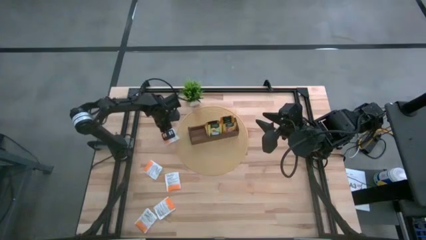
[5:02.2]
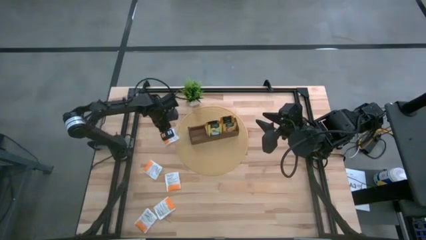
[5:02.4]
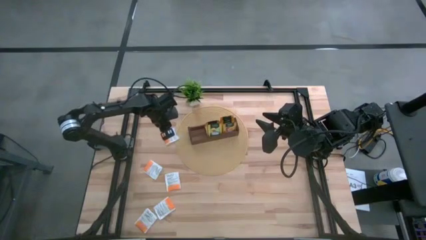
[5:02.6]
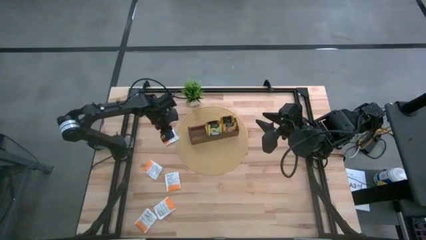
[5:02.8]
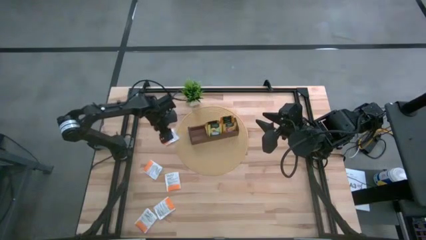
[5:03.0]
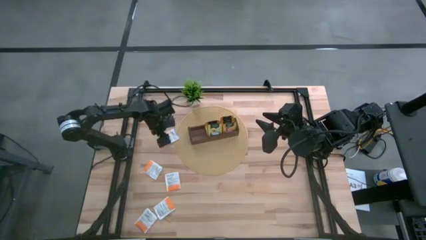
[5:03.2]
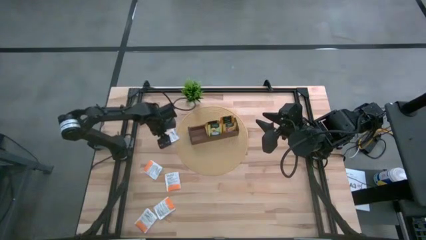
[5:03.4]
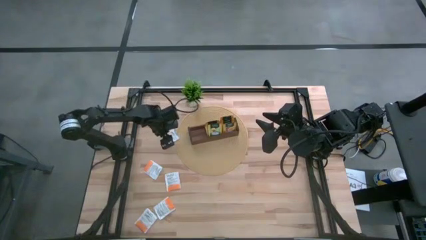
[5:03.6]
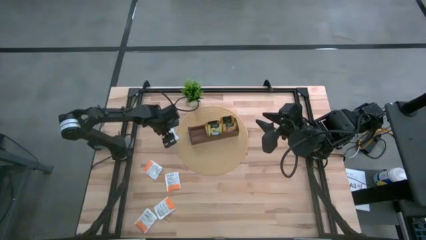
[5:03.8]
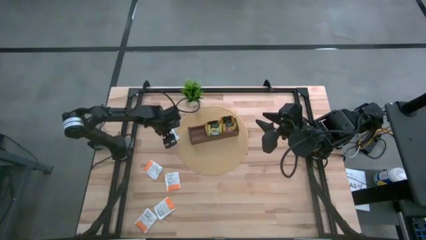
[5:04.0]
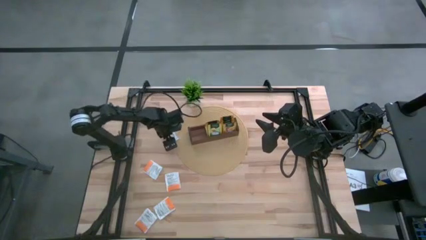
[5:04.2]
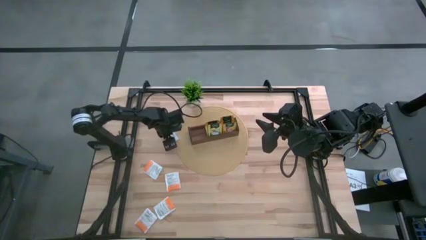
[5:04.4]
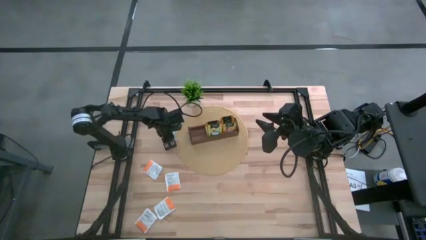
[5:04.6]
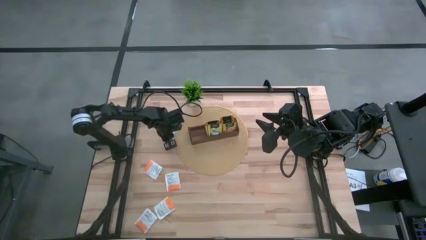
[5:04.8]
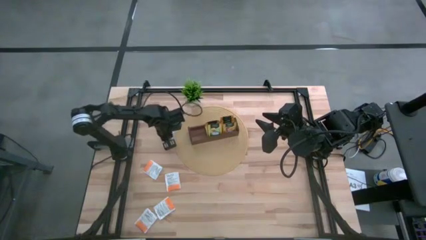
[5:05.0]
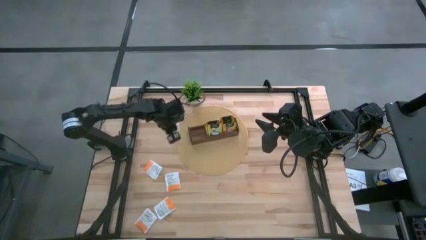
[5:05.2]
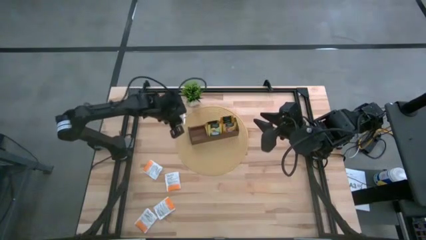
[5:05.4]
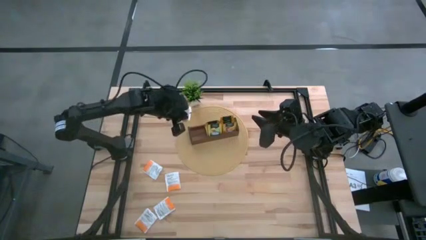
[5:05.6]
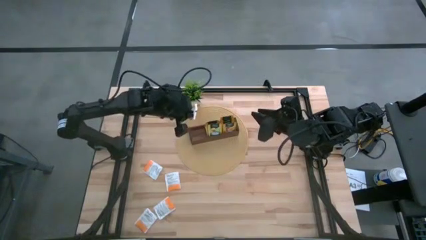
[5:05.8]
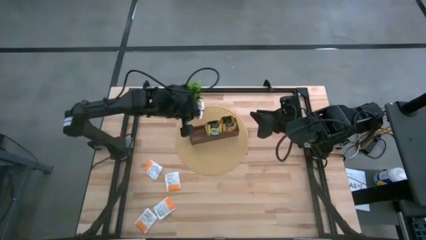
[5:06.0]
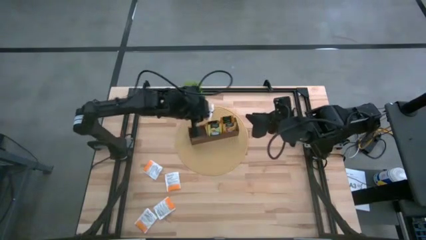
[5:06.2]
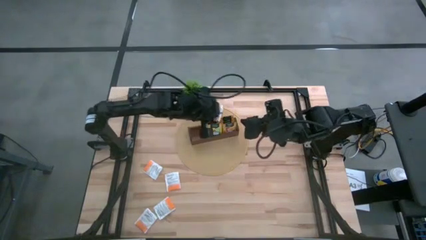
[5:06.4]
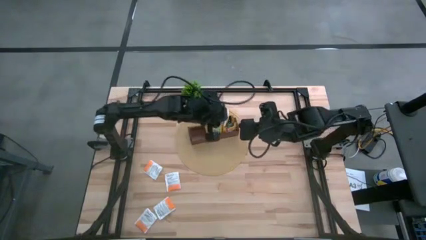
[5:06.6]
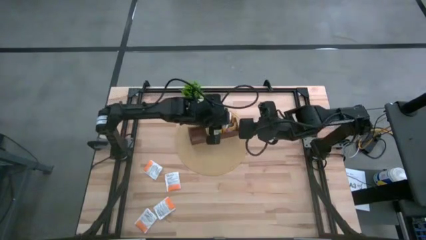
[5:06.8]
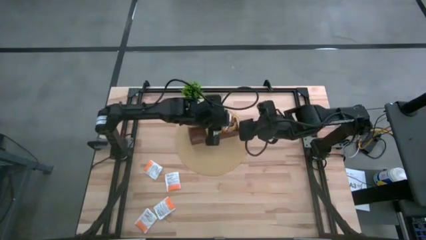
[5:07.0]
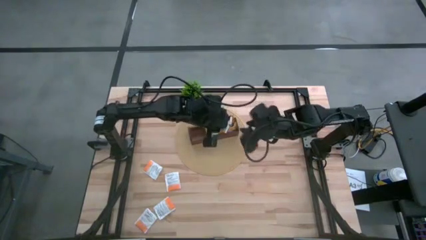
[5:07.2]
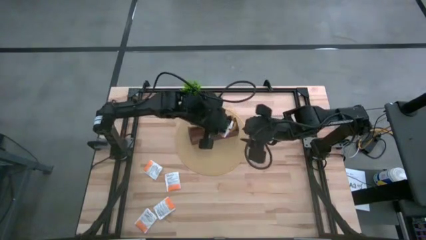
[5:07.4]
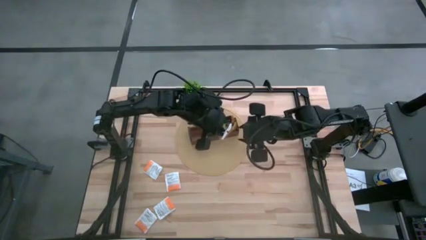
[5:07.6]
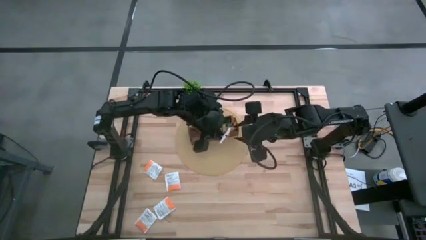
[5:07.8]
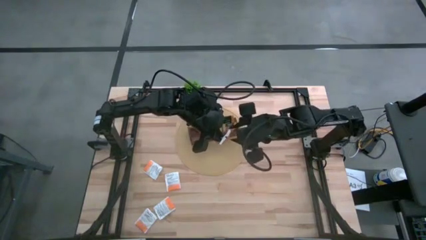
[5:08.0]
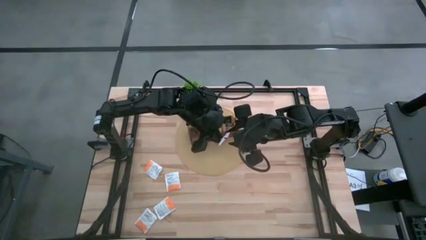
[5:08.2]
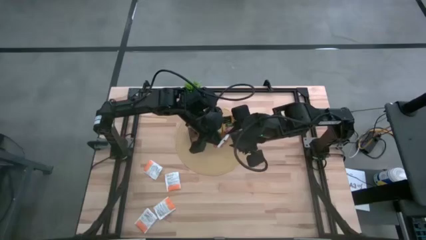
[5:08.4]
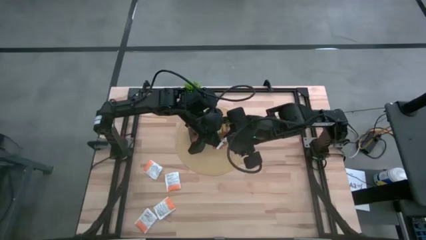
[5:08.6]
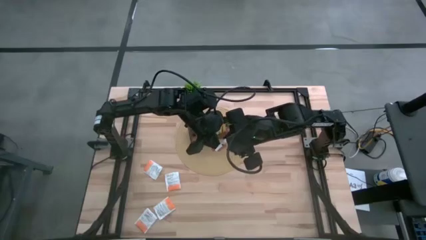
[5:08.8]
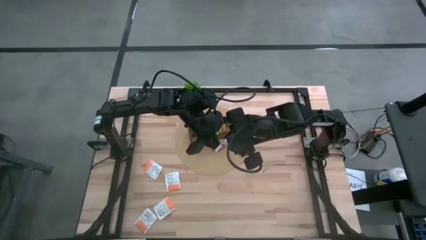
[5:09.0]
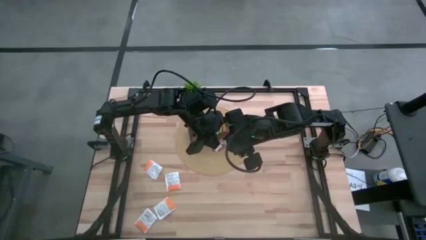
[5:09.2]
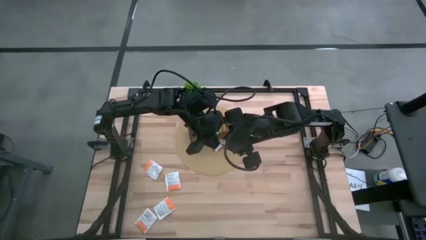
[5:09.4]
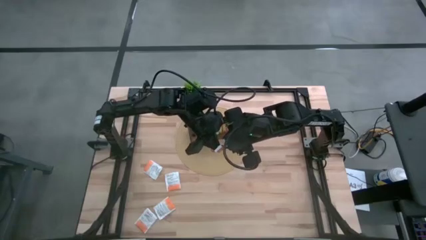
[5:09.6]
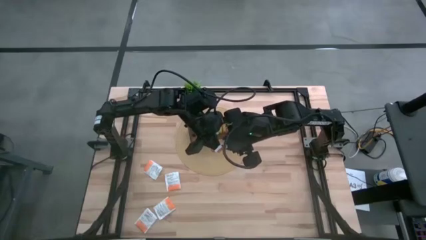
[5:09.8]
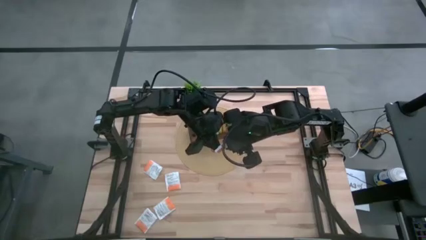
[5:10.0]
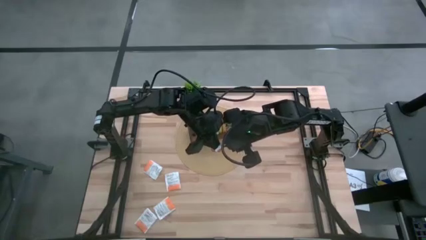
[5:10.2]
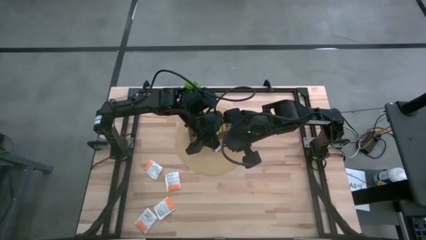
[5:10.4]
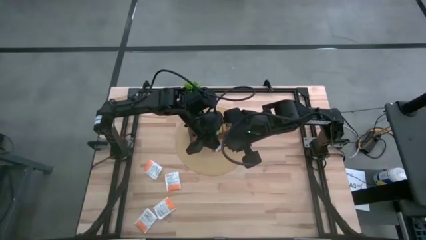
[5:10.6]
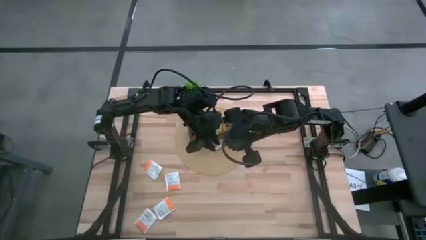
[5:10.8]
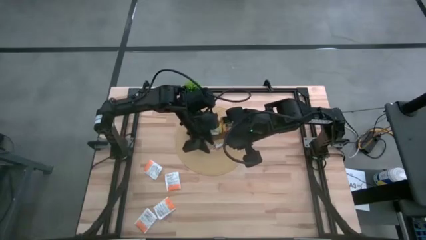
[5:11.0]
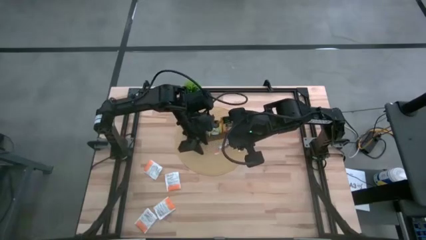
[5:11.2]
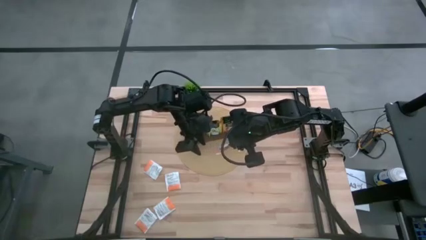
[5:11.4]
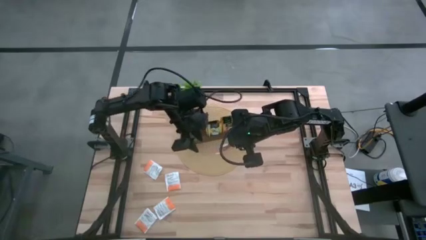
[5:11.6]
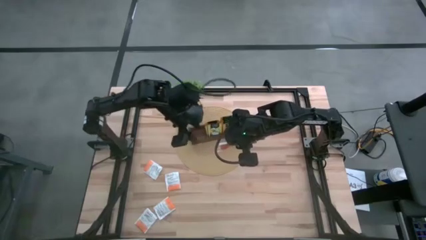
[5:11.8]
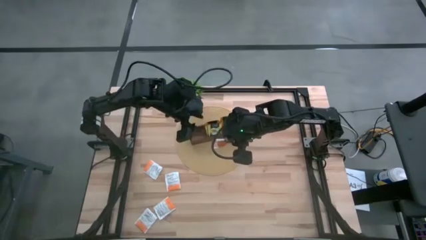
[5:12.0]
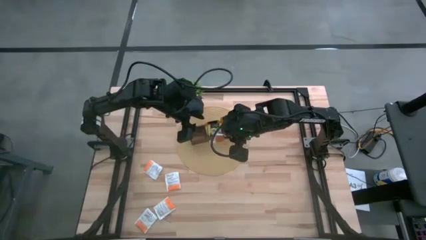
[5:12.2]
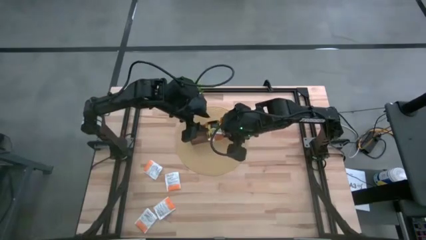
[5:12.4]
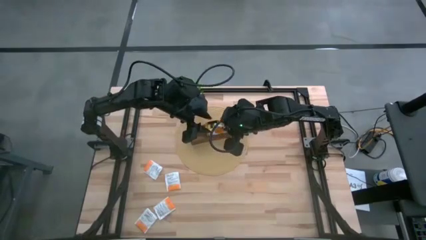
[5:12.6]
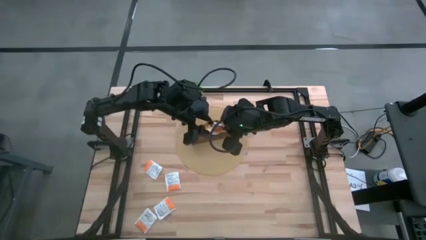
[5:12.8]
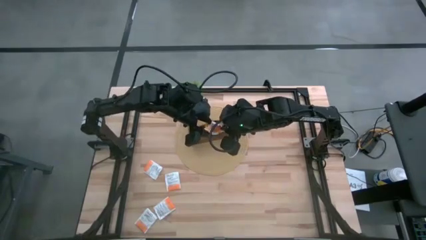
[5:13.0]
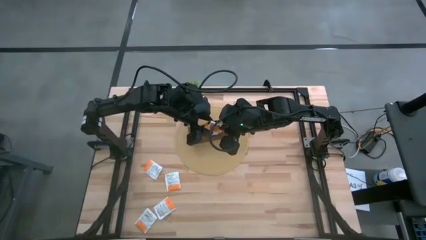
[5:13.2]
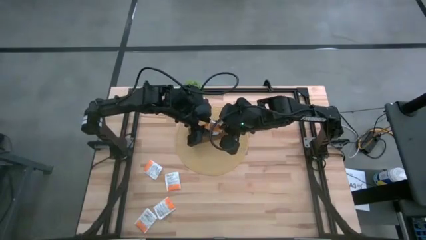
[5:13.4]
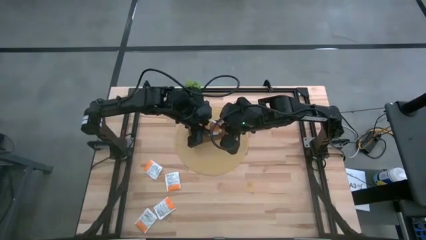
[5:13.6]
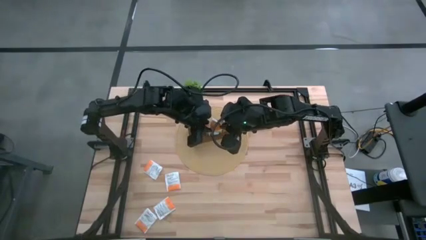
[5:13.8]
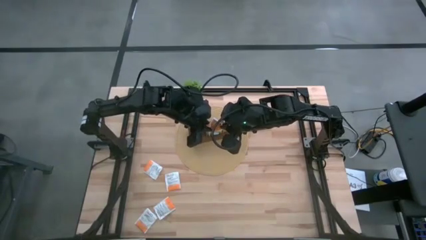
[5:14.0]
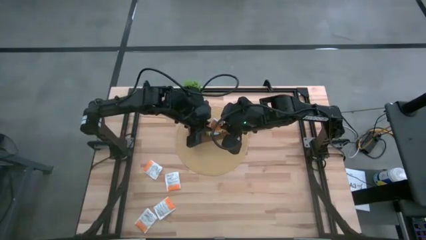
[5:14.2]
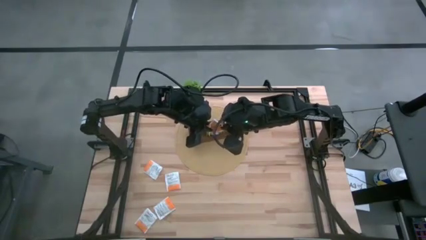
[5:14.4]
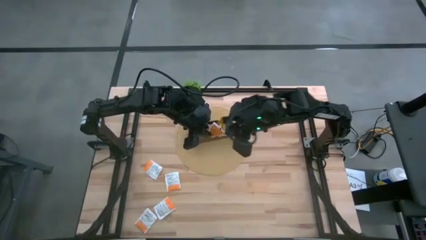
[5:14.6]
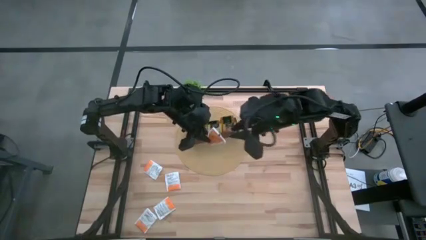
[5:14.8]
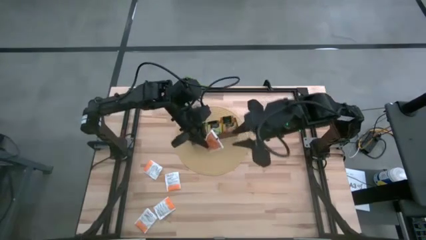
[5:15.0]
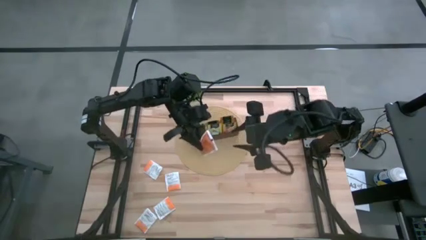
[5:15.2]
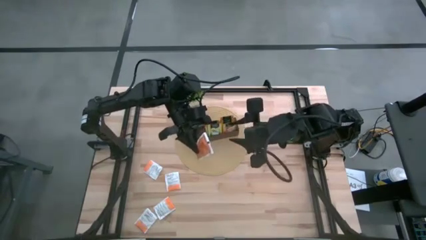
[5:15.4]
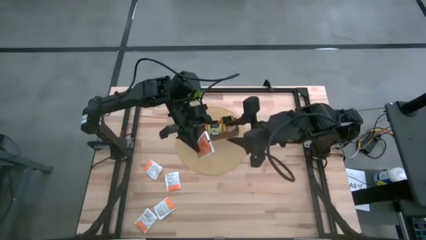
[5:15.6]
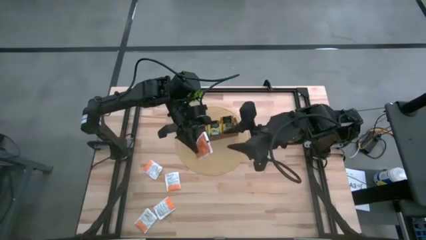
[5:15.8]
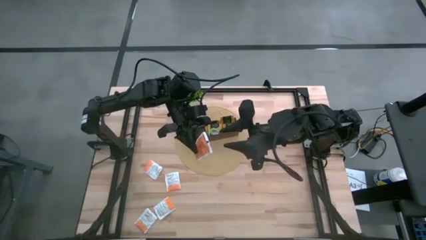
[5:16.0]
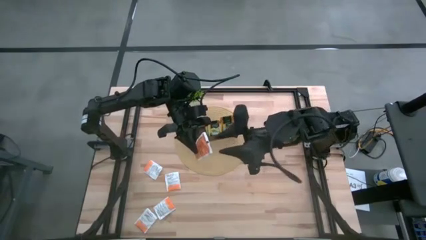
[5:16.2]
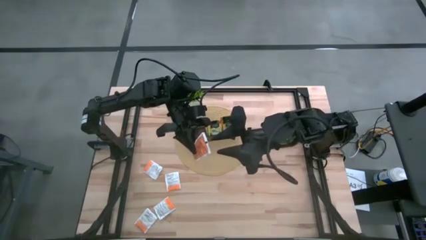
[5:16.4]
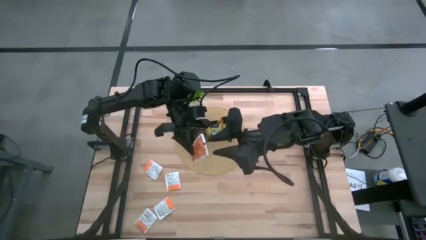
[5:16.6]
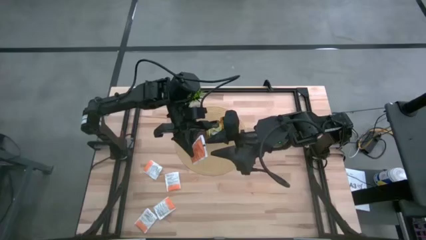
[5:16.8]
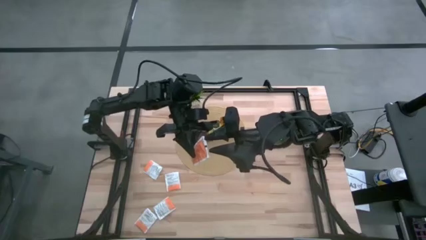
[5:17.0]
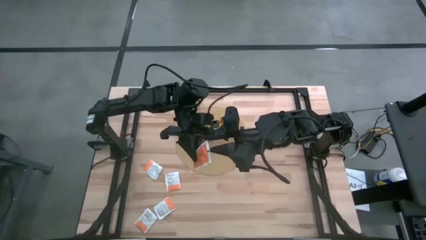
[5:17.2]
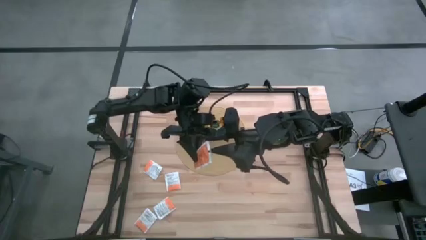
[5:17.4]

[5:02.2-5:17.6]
Task: Pick & Place Tea
Put the white tea bag into the left section of the wooden organizer
